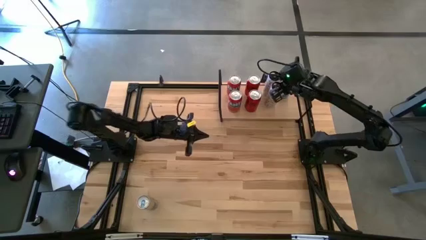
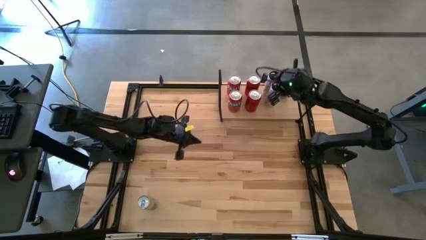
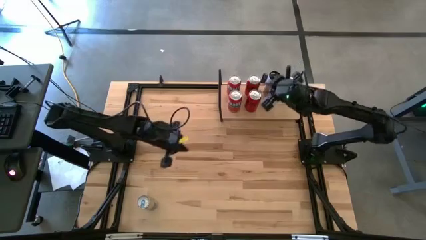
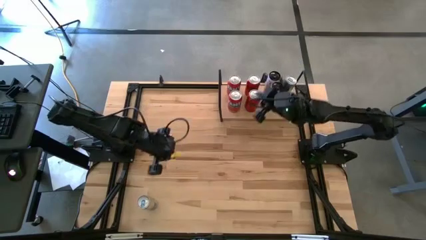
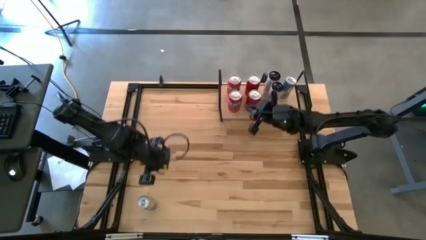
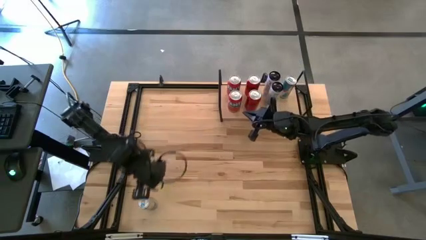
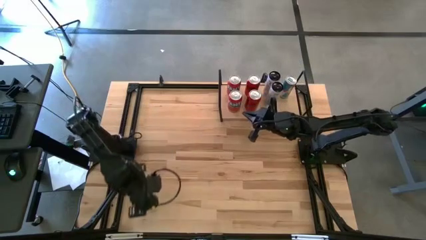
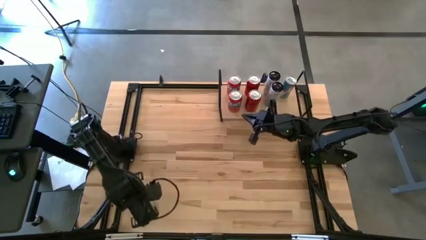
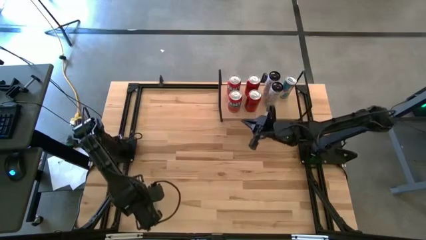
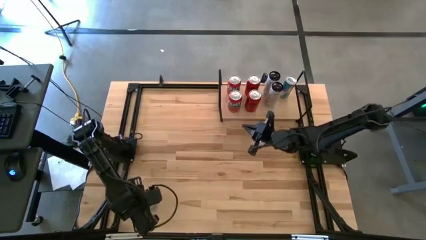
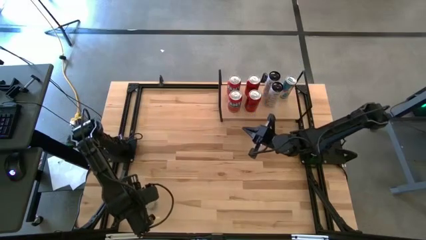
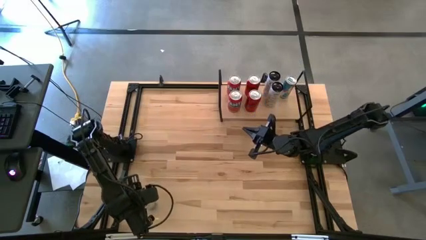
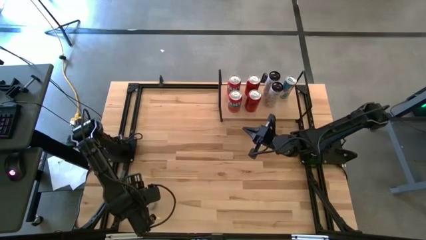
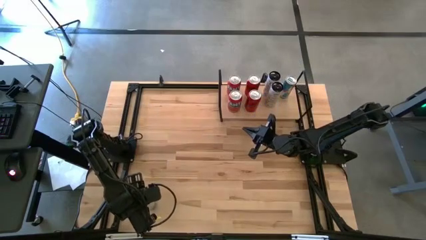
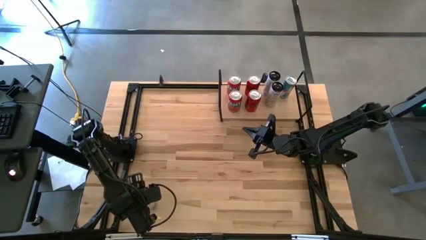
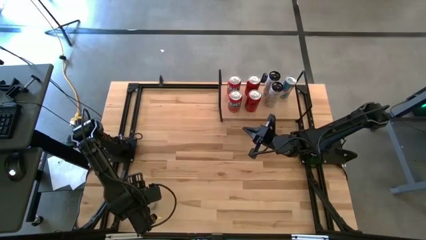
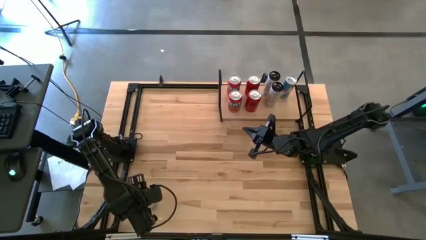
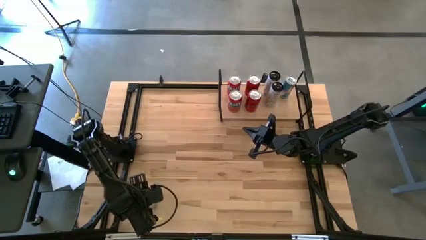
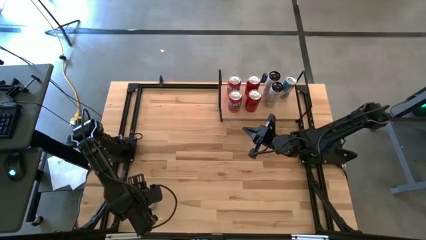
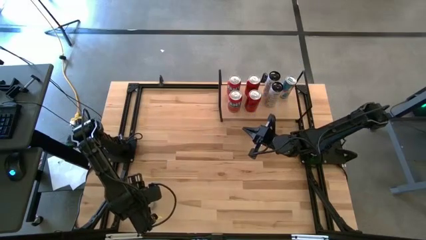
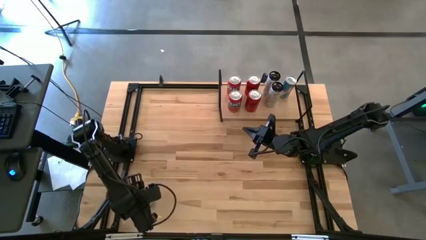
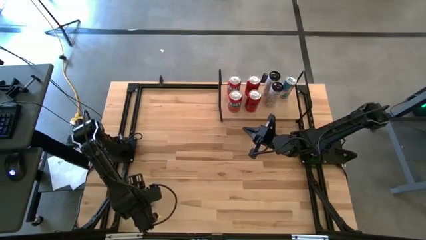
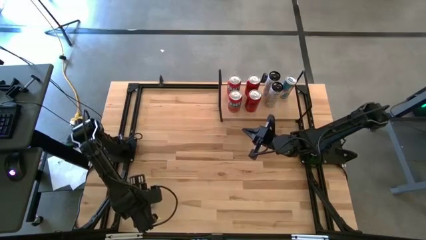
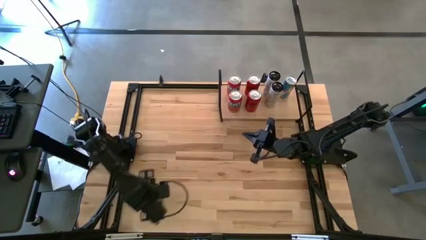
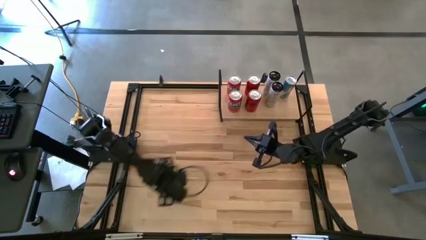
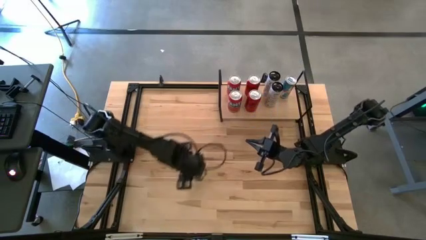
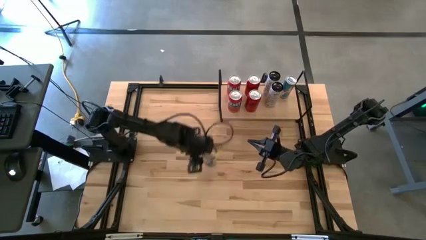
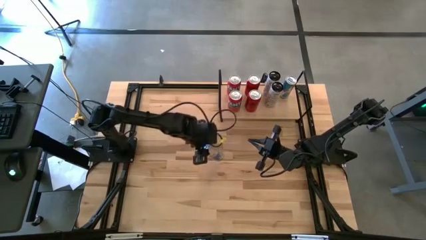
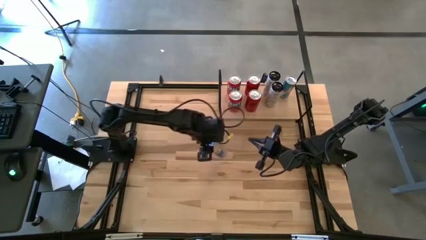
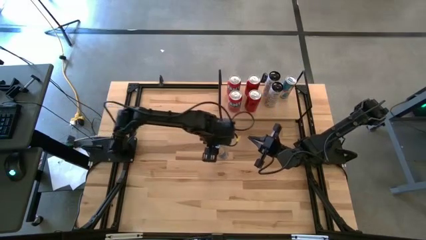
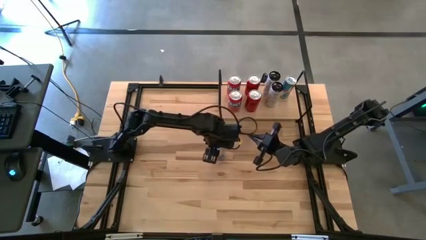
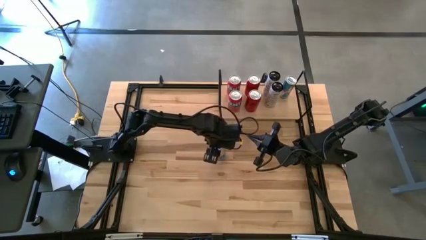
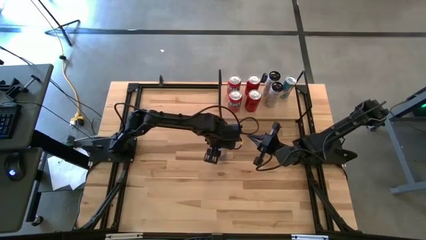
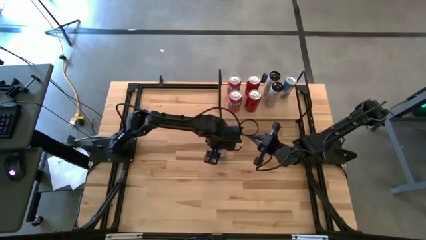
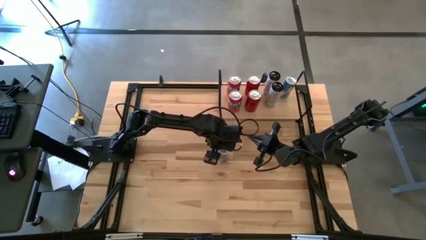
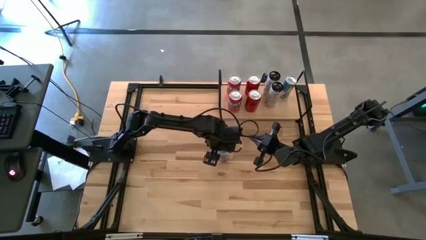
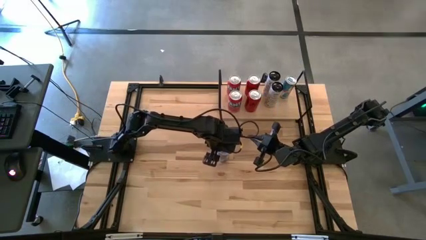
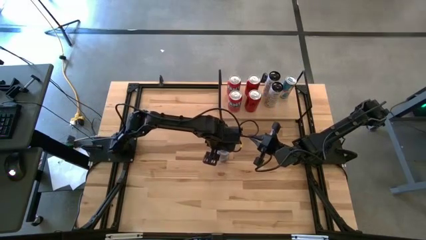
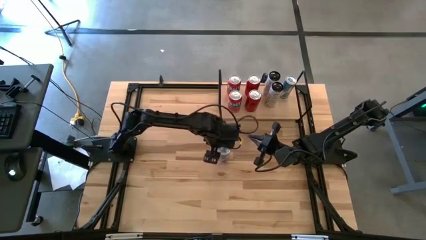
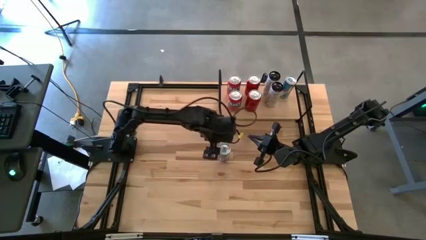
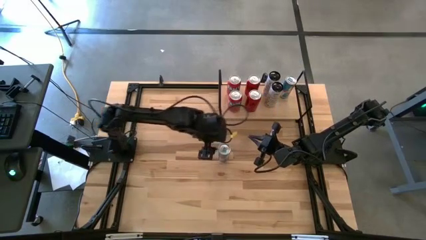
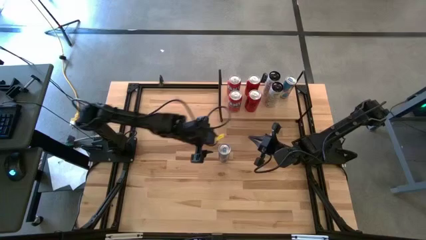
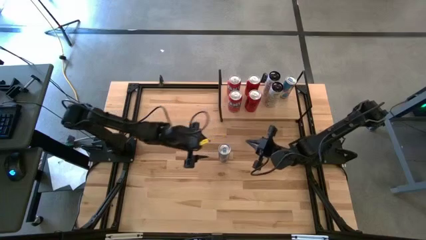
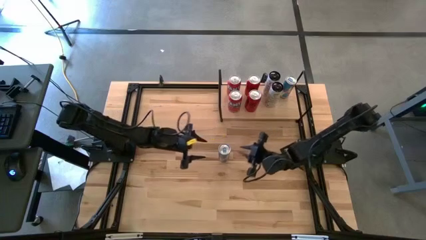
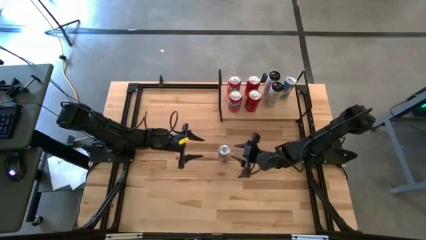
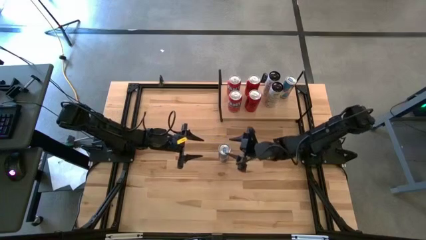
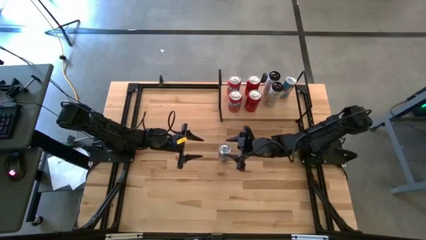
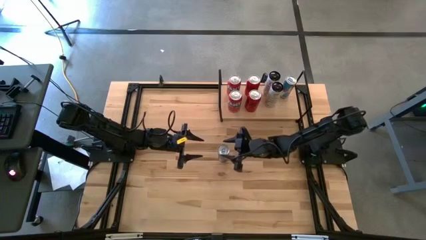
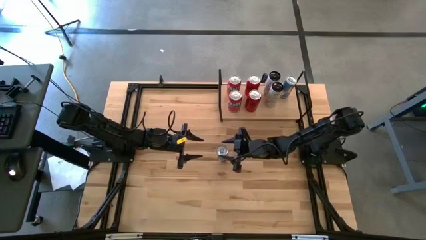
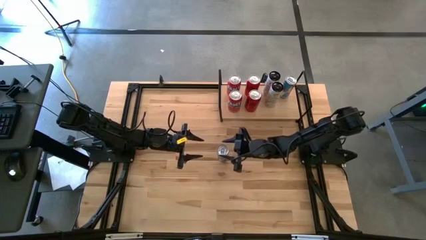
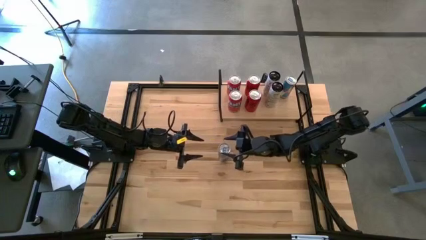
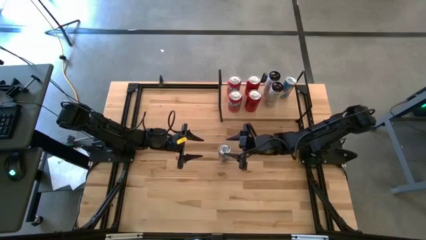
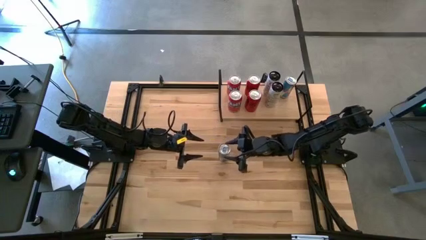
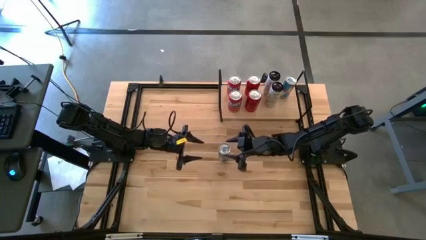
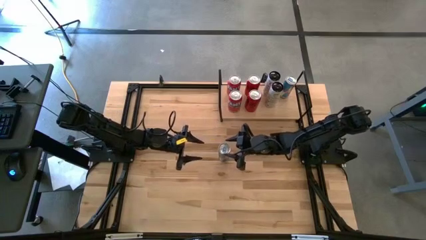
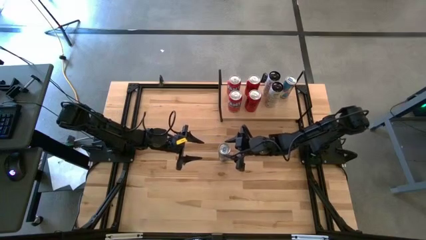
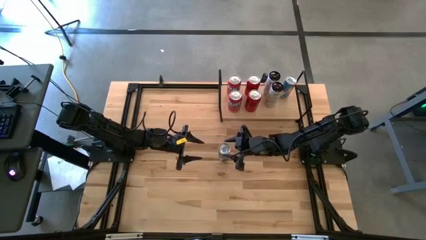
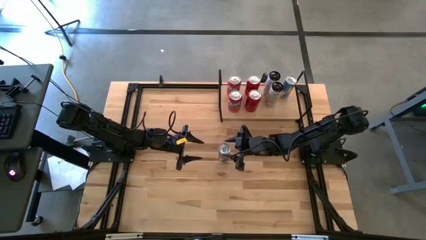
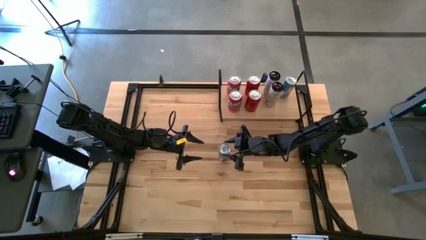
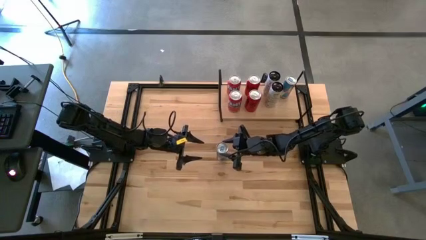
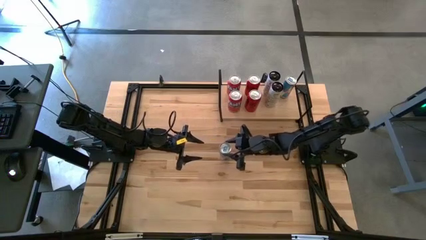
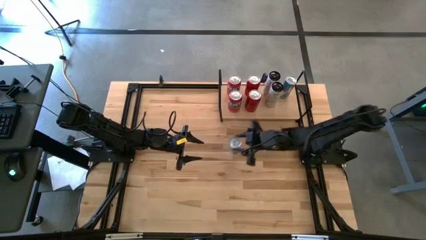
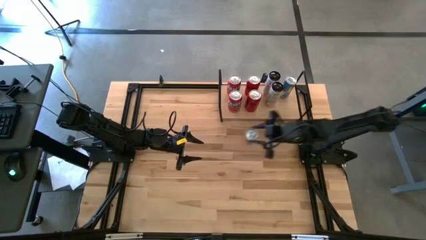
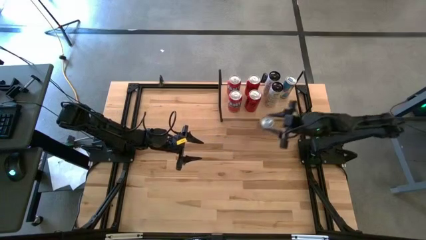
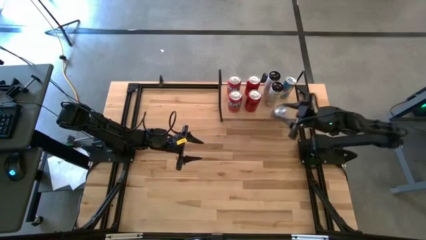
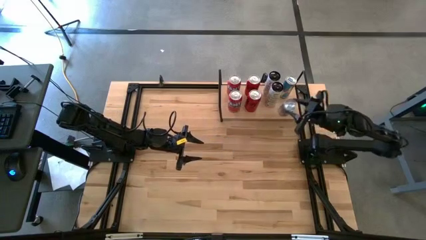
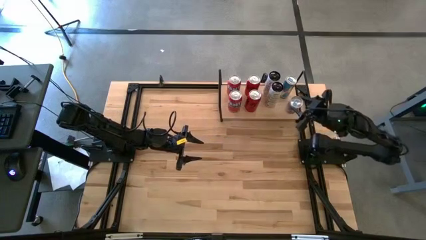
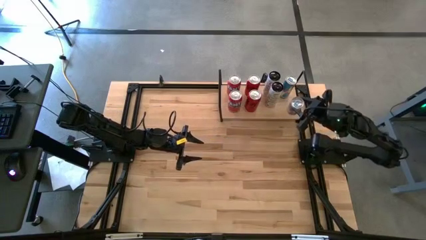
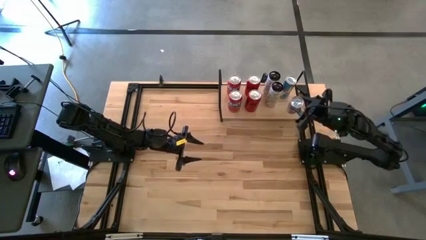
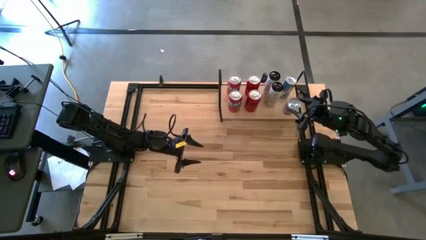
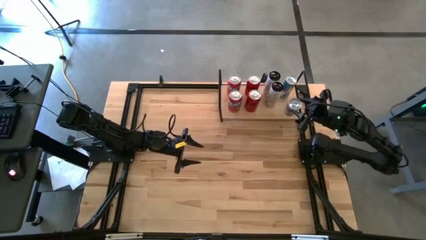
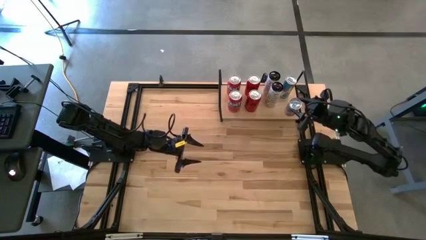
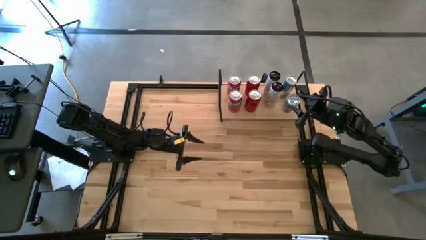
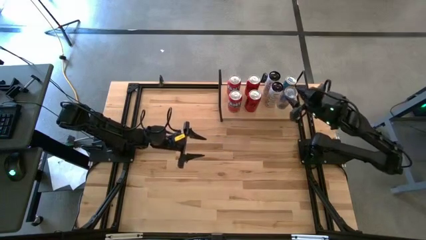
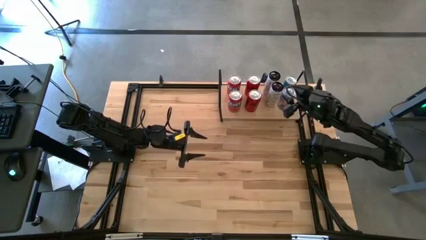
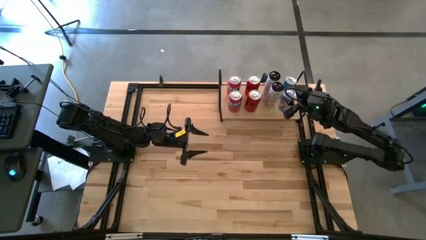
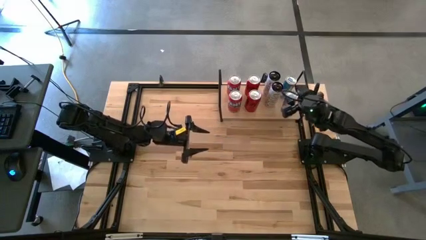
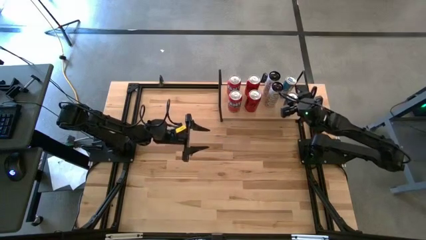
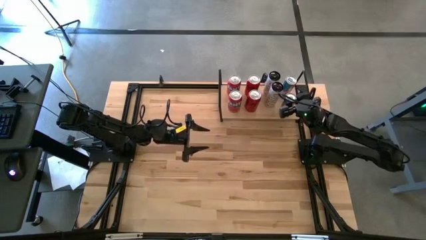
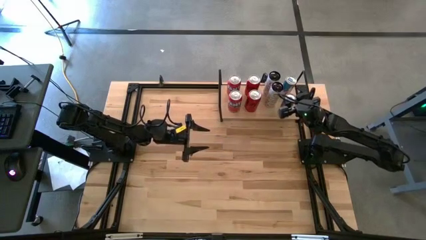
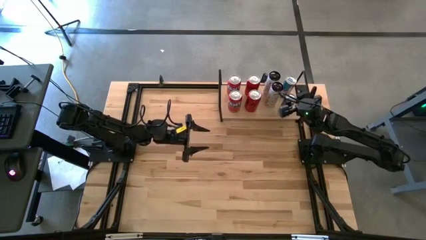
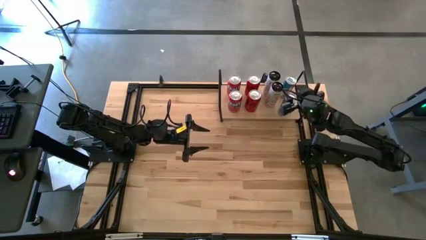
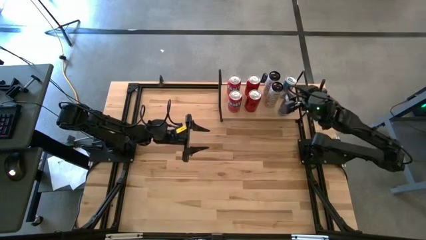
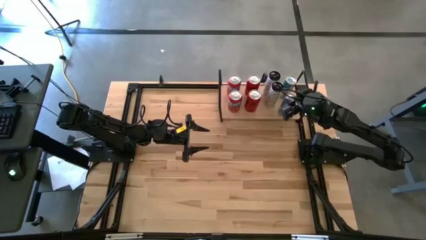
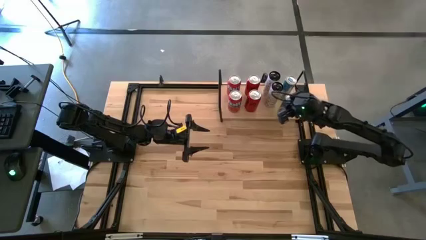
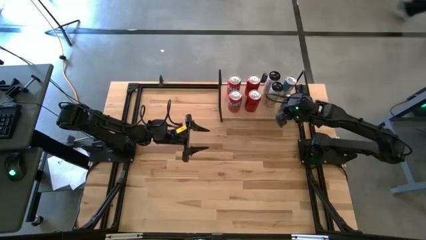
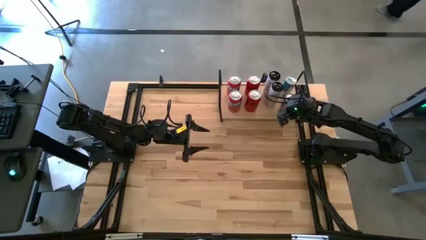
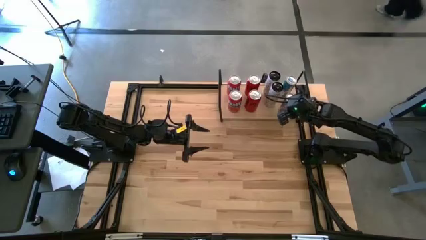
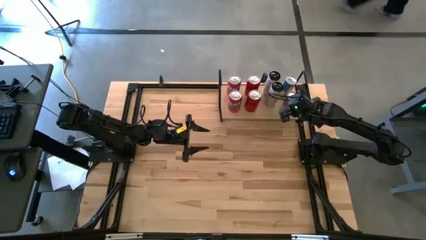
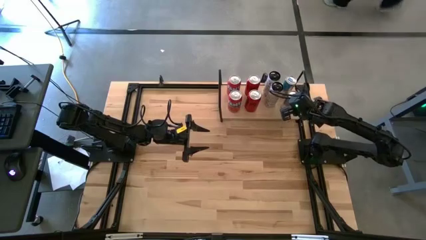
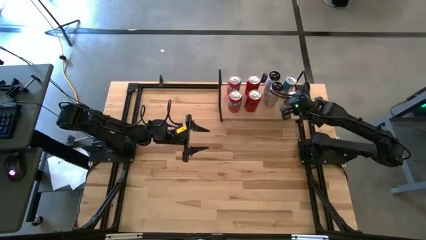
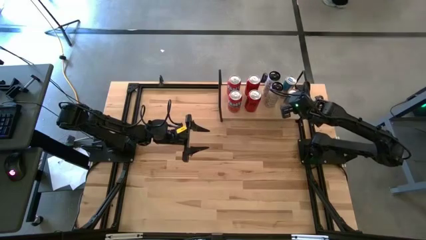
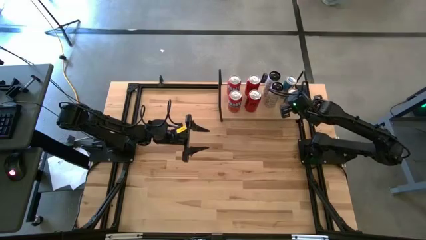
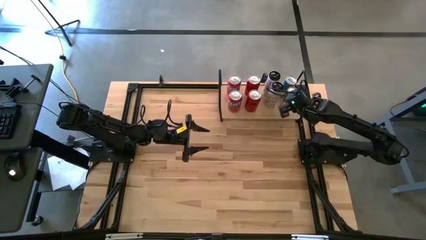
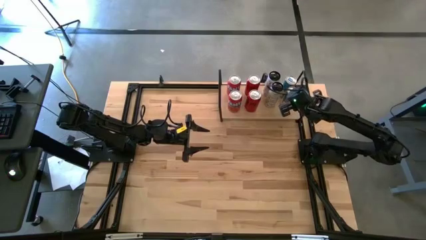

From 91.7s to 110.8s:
Task: Place canned beverage on shelf
Put the blue soda can on the shelf aligned with the blue soda can
